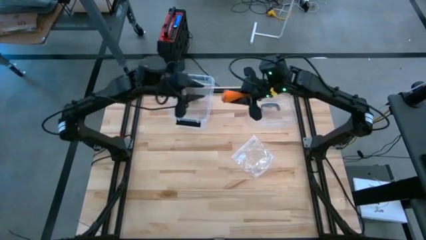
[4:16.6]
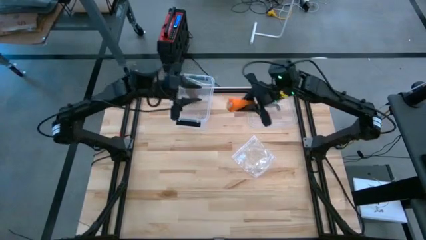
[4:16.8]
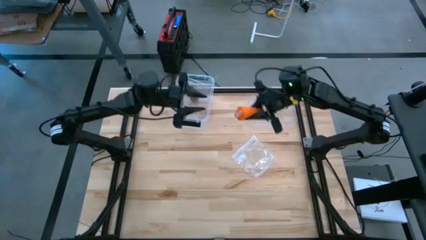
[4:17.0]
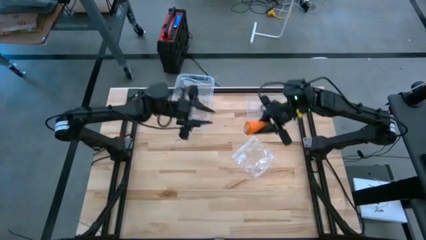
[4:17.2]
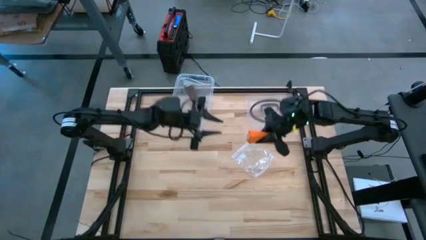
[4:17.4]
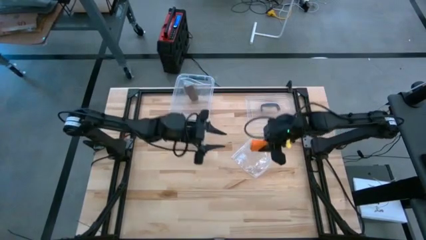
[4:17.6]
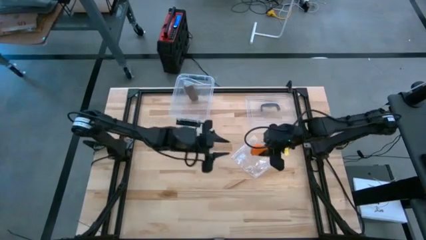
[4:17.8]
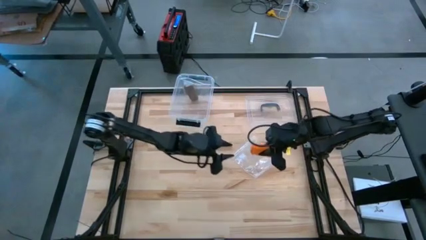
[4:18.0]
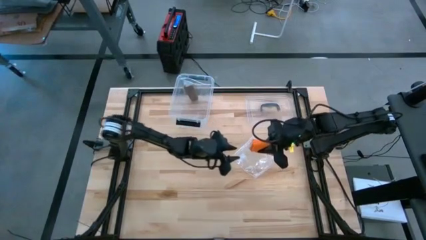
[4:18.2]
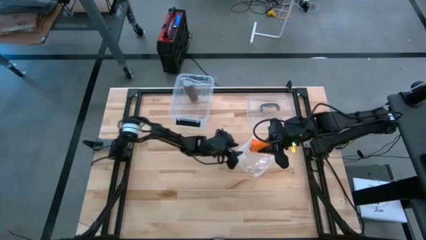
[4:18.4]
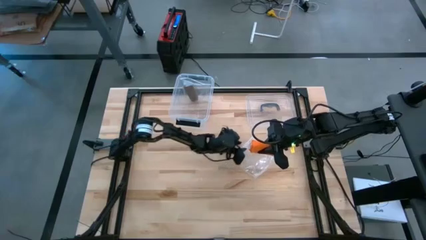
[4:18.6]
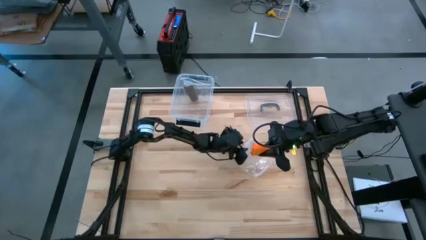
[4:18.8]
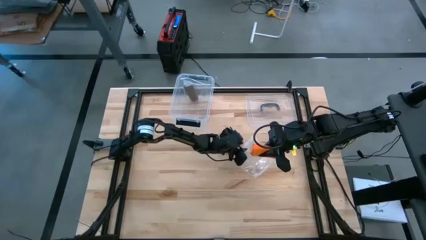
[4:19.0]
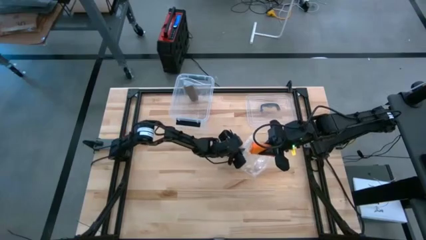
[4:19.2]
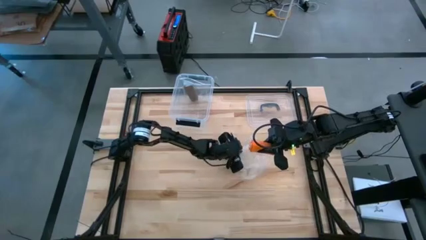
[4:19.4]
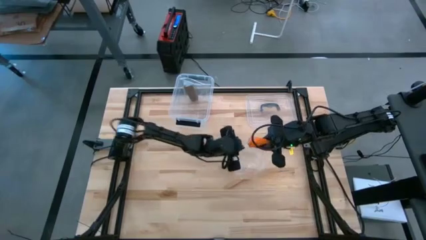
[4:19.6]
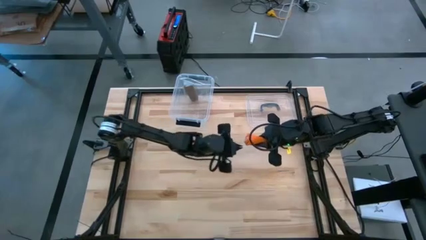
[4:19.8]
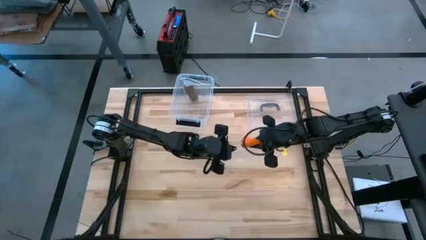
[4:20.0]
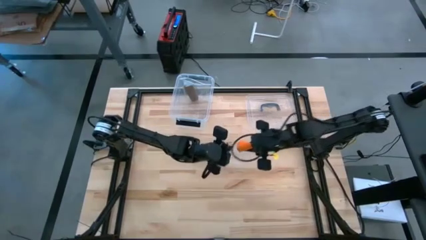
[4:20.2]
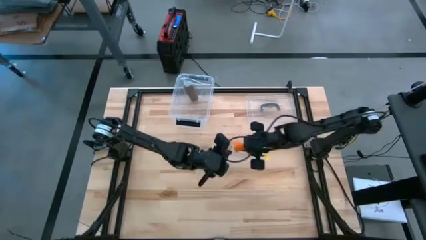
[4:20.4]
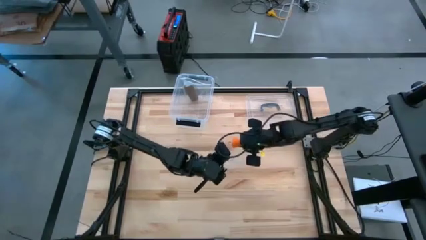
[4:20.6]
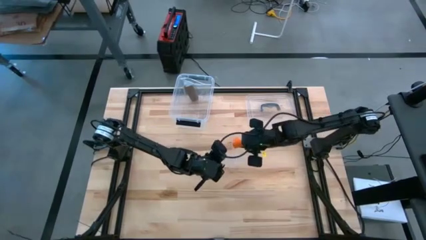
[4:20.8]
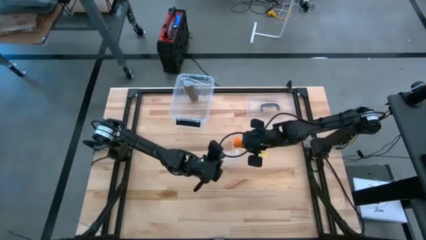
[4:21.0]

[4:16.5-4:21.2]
Task: Roll bandage
Put the rolled orange bandage into the transparent zip bag

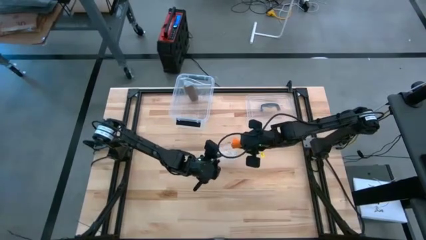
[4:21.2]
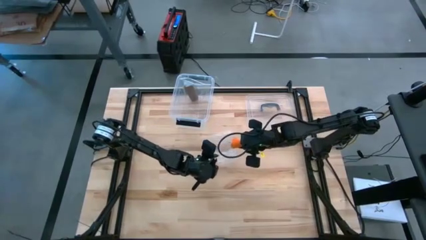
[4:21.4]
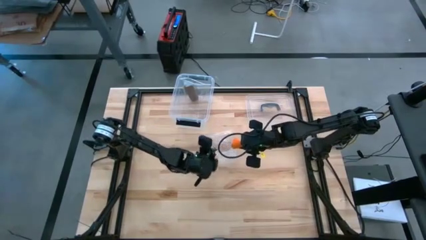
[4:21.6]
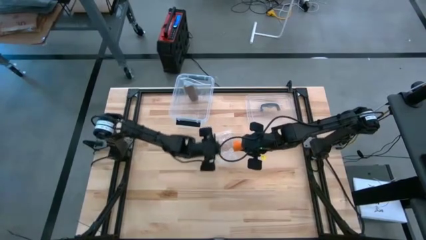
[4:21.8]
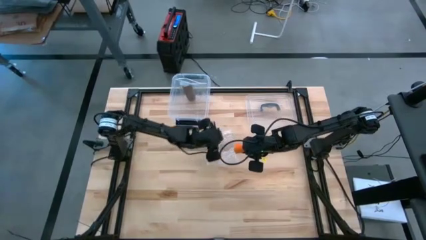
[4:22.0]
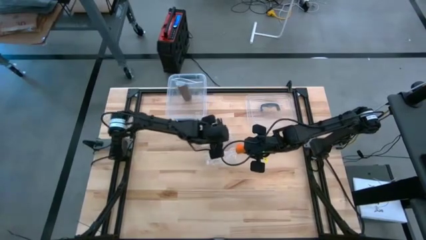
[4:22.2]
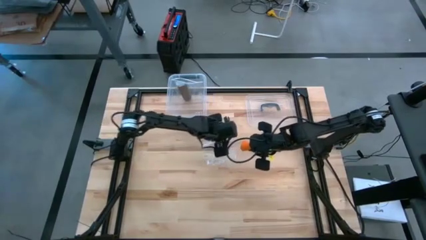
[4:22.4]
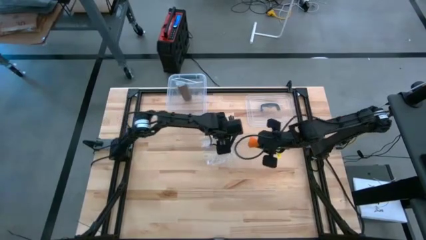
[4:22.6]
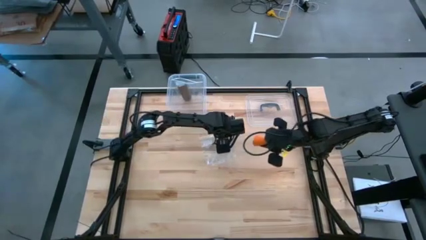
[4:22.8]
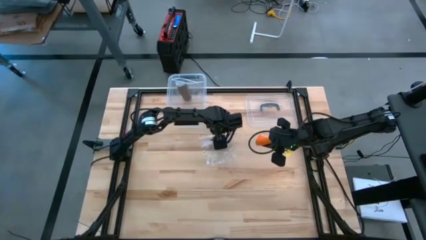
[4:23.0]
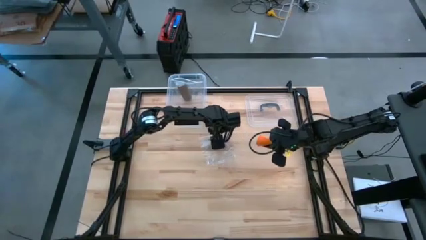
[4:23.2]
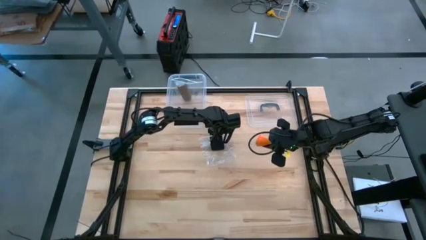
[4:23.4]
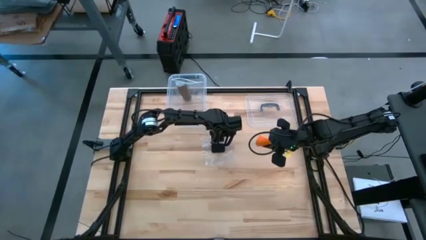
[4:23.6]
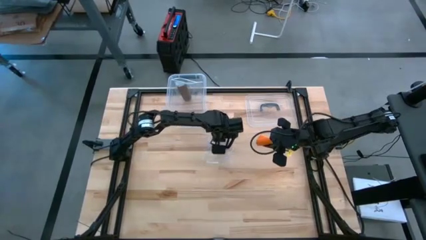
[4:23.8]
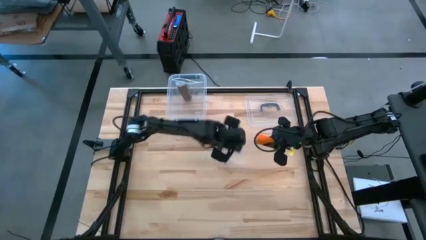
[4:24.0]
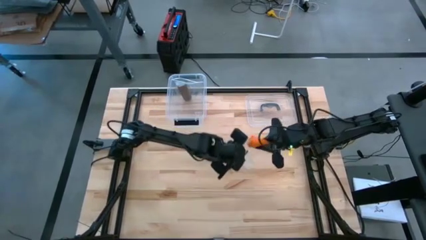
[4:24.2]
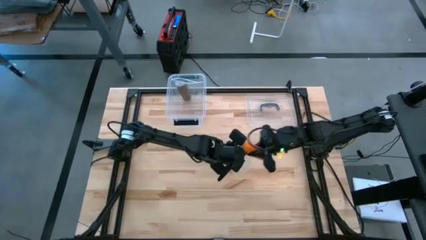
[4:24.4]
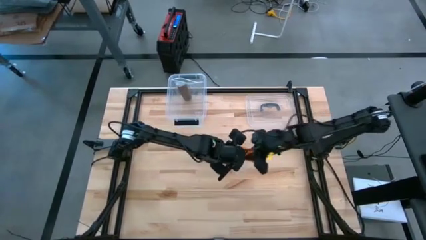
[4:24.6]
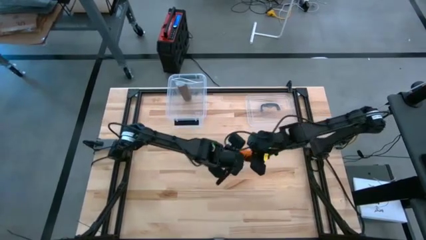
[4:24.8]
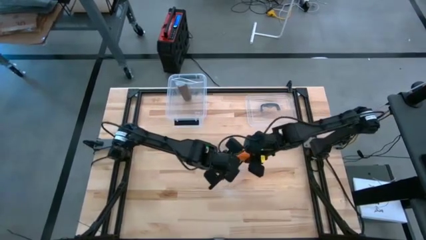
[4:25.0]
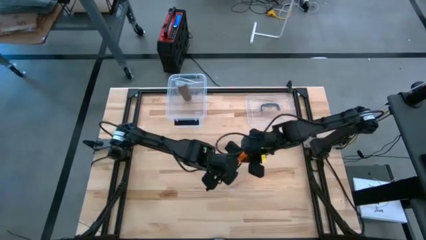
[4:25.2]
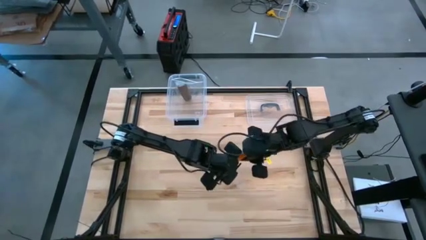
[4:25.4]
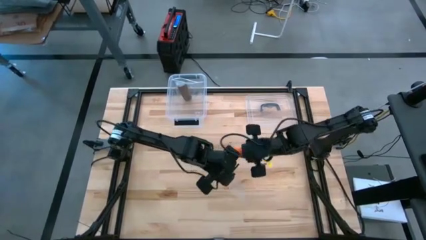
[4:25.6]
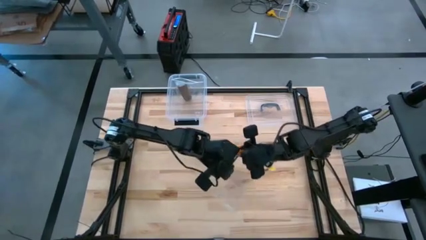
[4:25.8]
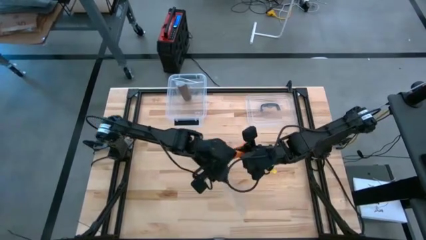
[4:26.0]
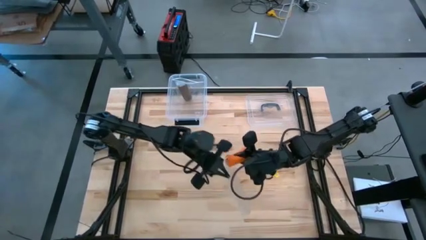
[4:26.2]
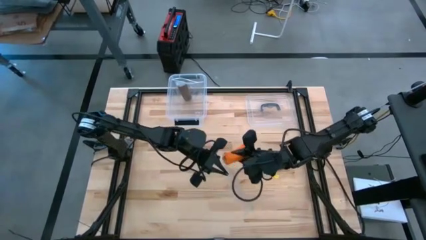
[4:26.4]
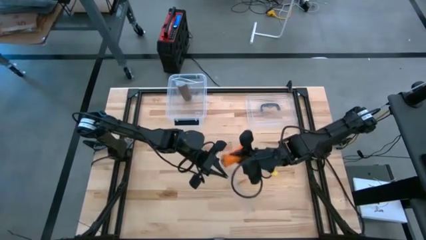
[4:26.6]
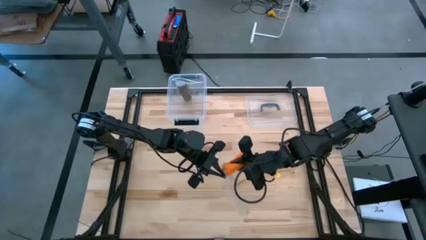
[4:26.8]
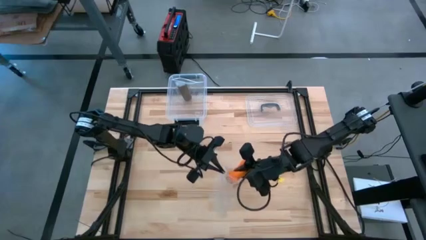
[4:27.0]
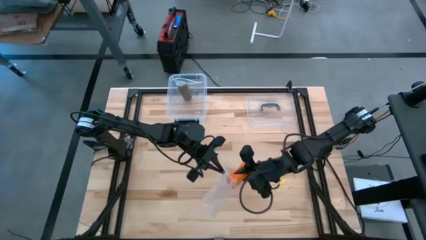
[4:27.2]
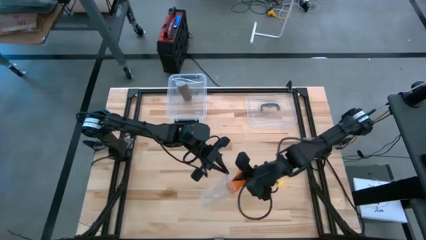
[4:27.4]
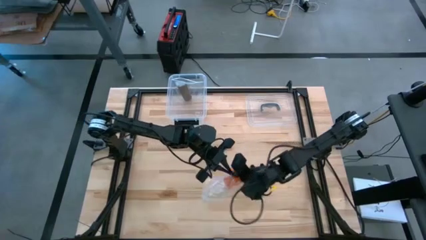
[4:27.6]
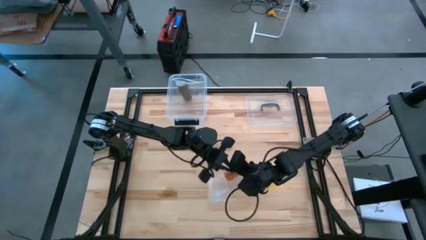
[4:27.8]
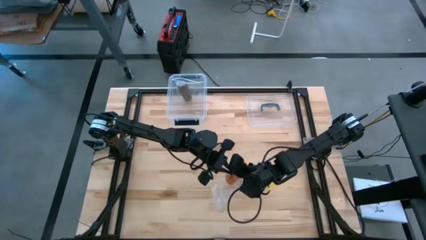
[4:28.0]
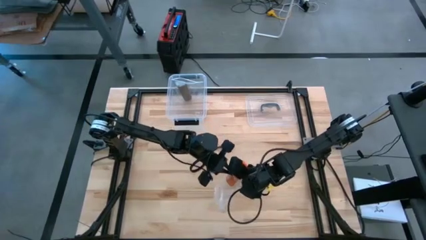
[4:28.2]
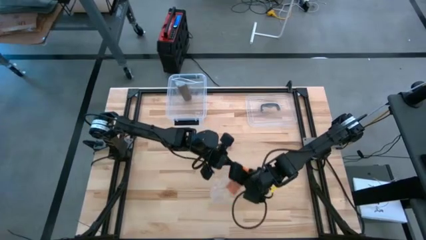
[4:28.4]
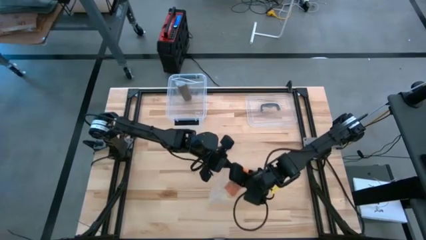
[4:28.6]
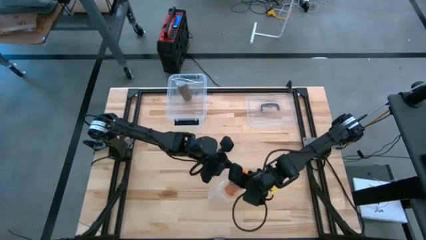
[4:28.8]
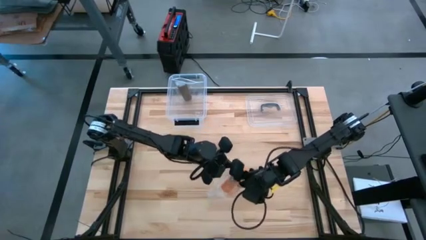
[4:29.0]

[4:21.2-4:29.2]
Put the rolled orange bandage into the transparent zip bag

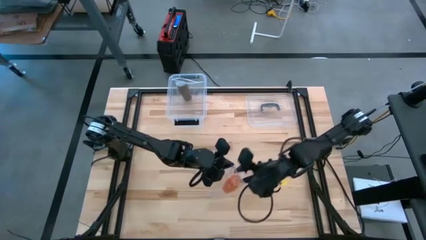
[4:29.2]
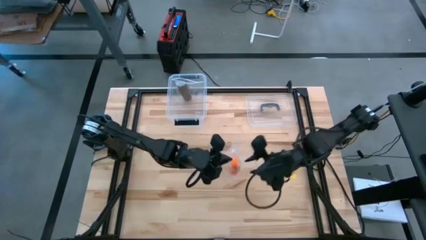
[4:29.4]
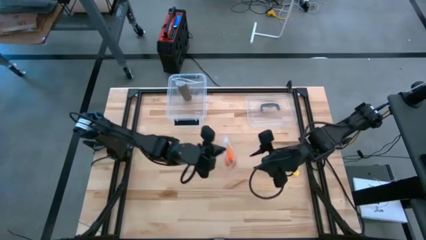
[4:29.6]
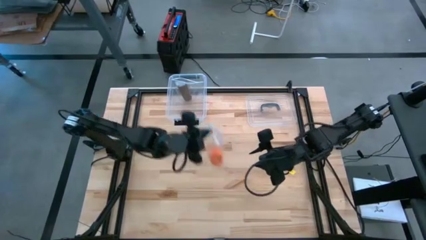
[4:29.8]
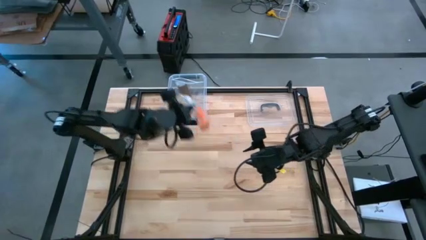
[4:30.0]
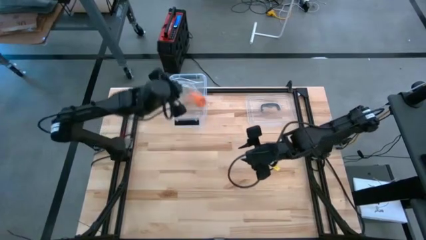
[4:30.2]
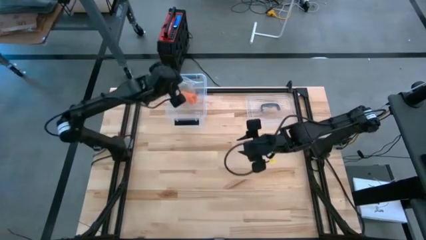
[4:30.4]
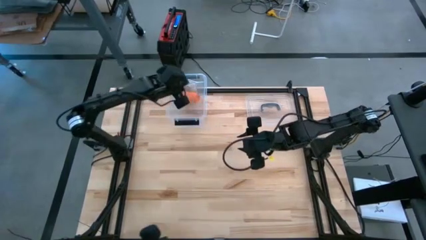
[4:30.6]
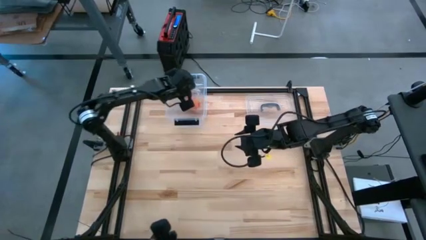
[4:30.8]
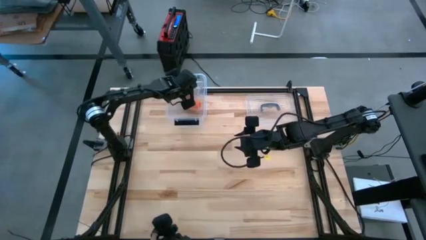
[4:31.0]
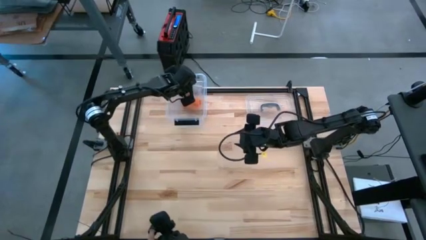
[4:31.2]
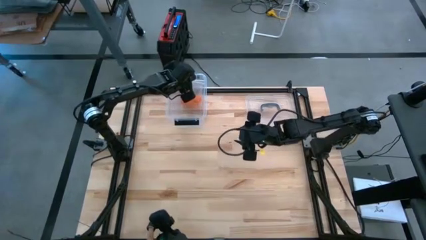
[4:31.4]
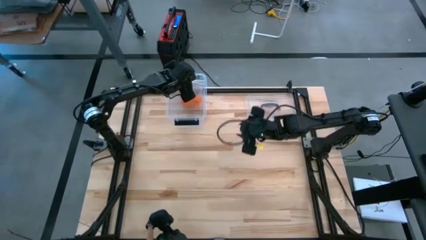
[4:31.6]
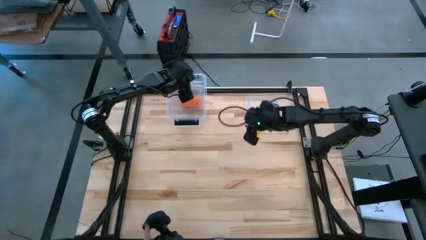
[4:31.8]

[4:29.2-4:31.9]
Put the transparent zip bag with the rolled orange bandage into the transparent container

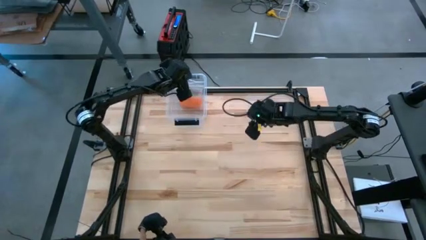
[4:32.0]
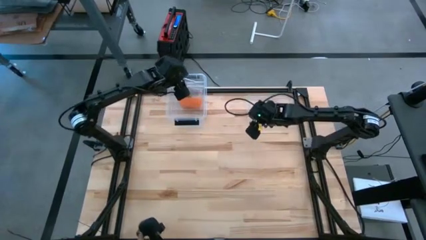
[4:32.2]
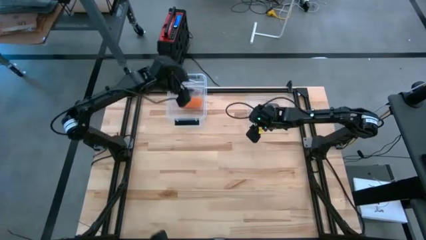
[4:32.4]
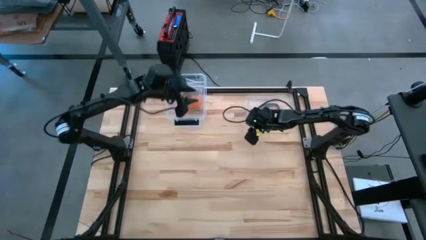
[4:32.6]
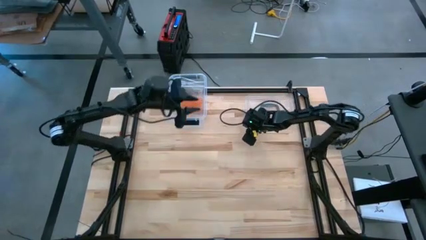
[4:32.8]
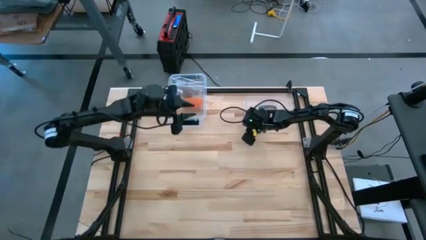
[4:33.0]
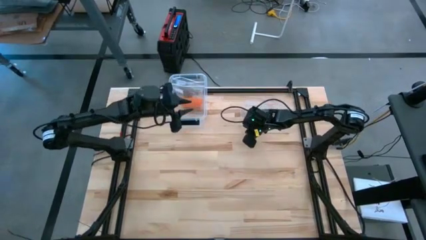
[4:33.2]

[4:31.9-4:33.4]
Close the transparent container
